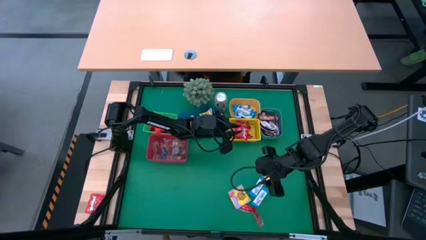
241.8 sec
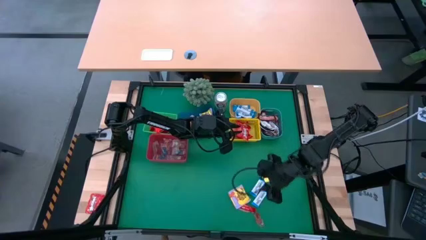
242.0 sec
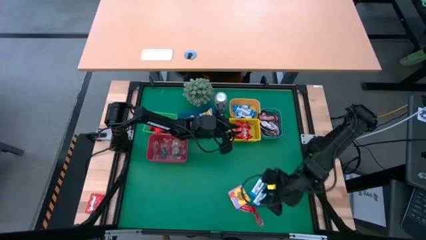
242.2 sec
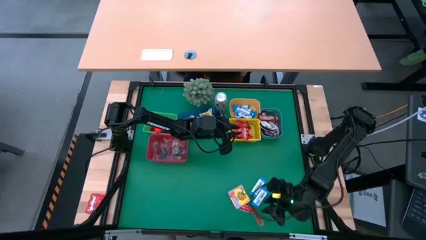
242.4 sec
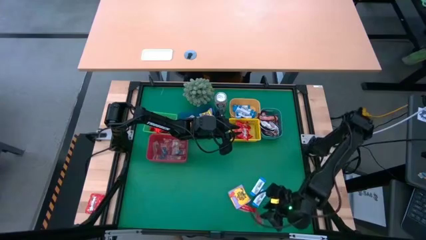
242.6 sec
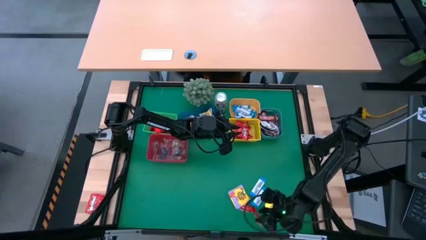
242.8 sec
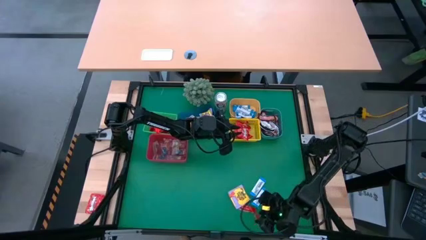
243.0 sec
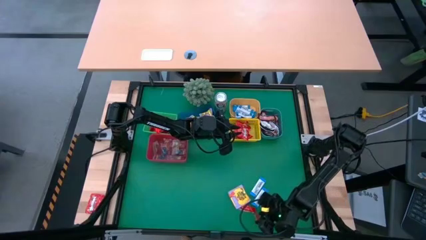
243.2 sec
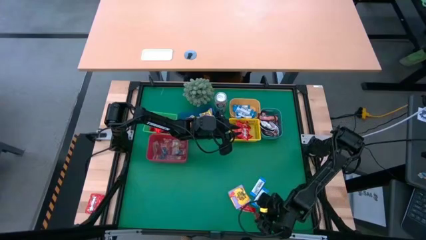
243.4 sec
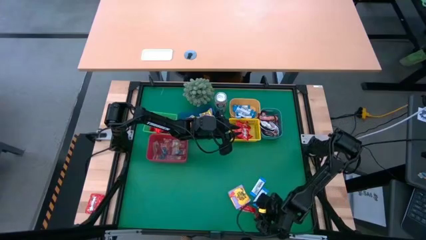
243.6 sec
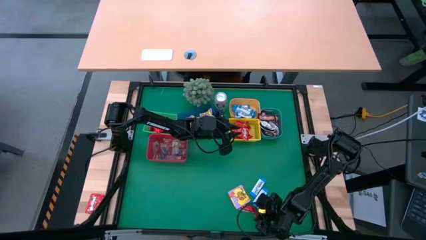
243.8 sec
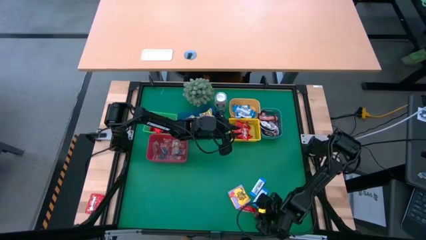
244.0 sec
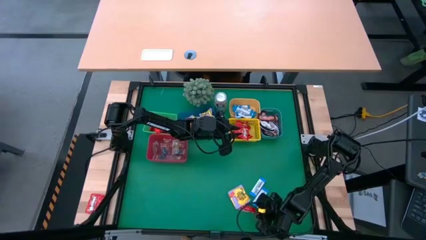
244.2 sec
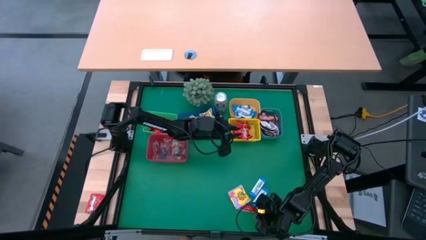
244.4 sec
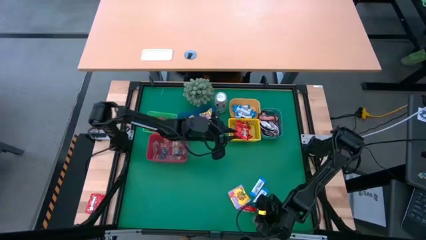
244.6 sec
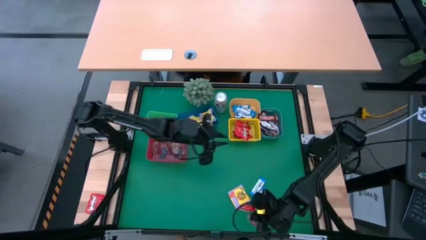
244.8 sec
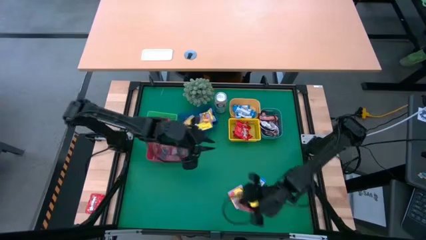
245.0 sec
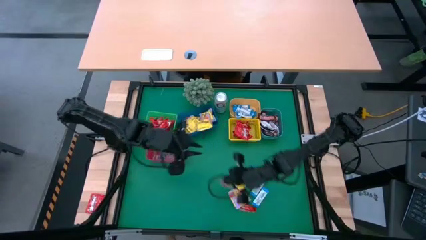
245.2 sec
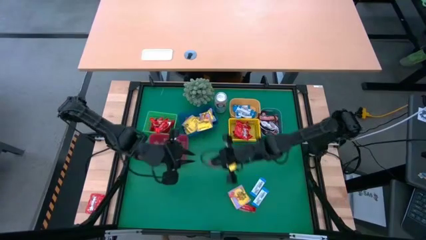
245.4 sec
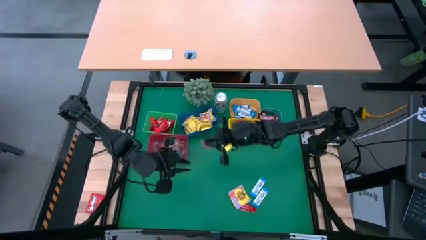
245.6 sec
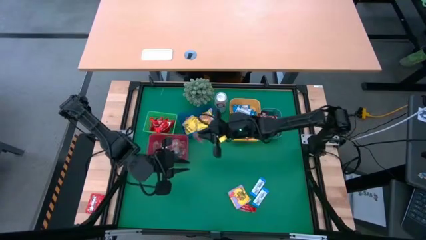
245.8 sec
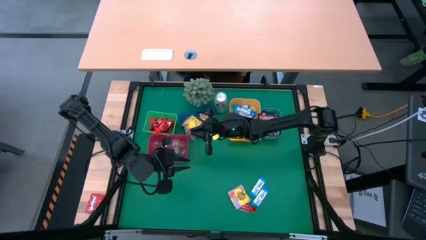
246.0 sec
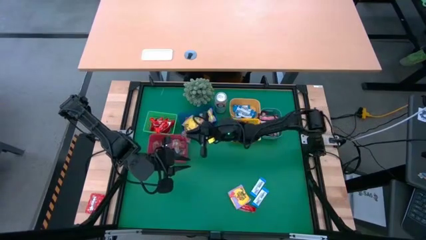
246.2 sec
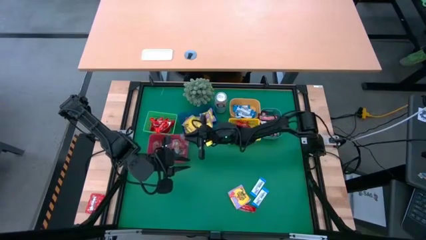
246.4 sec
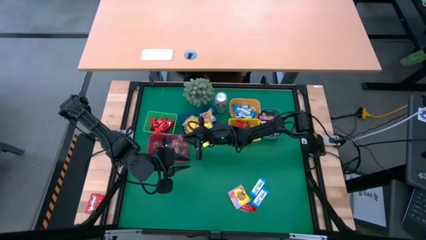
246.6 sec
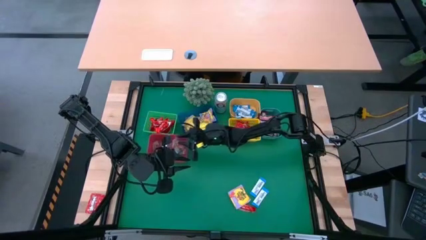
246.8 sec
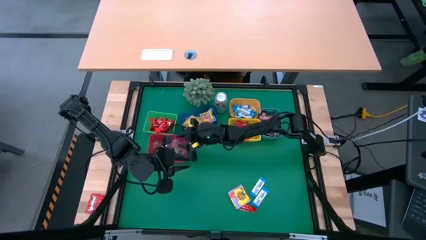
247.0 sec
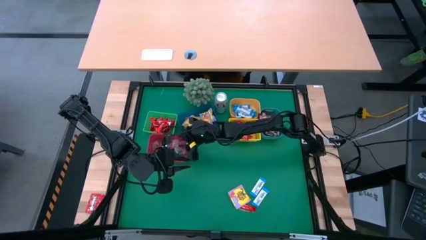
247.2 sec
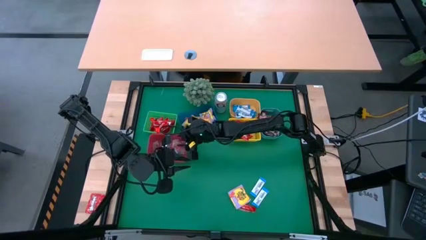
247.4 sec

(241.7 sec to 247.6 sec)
Task: Sort candy
Put the transparent orange candy into the red bin

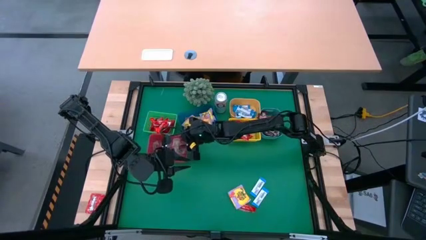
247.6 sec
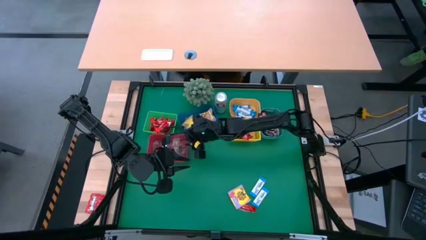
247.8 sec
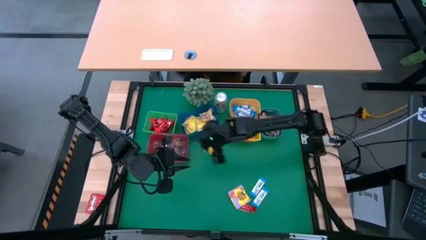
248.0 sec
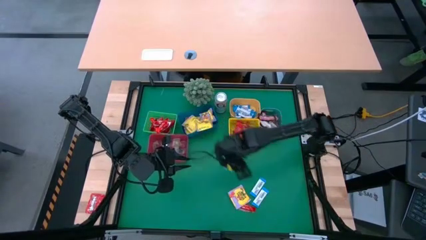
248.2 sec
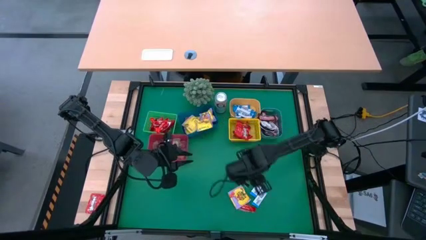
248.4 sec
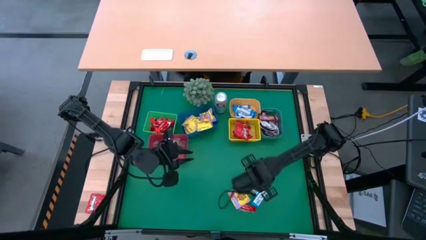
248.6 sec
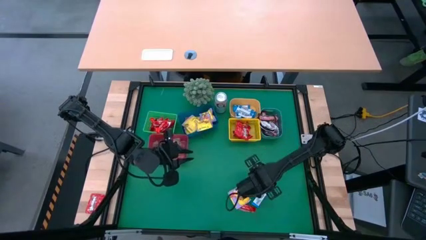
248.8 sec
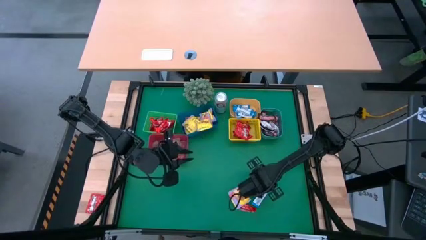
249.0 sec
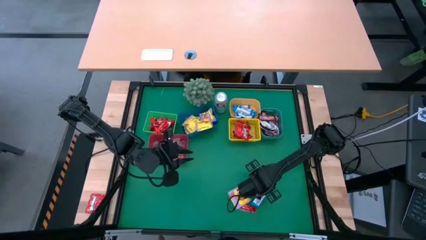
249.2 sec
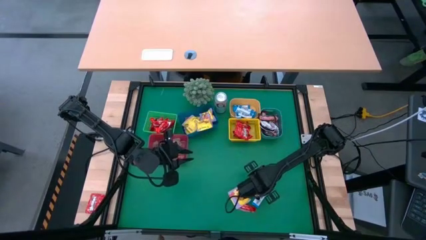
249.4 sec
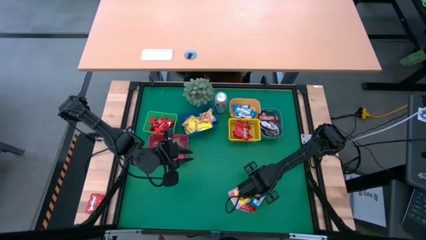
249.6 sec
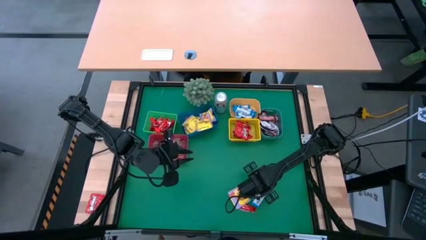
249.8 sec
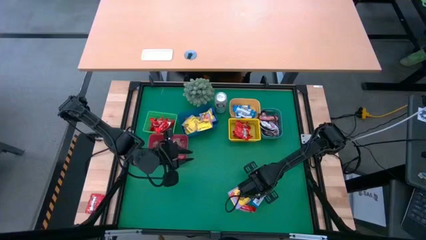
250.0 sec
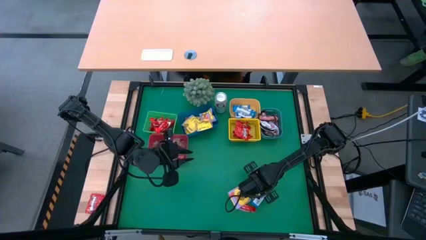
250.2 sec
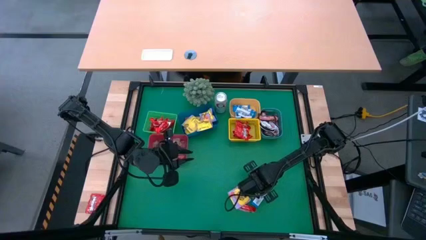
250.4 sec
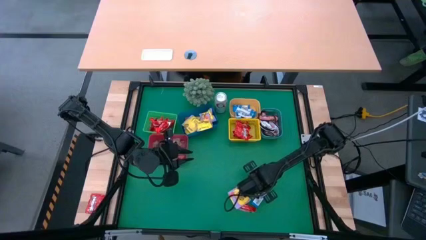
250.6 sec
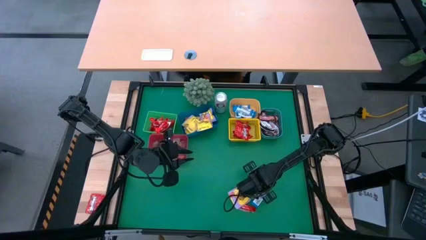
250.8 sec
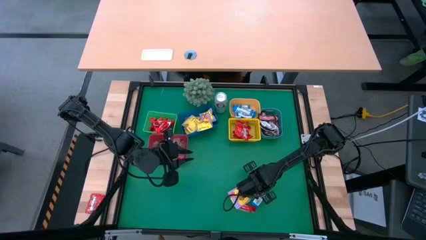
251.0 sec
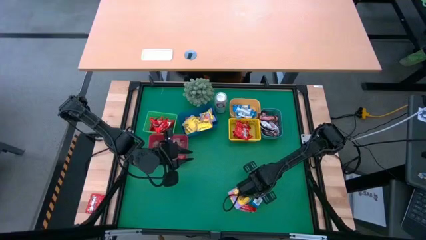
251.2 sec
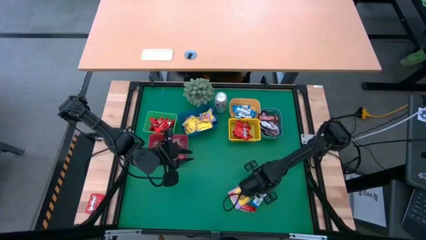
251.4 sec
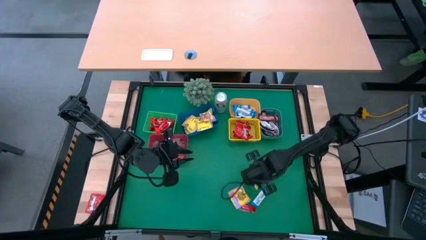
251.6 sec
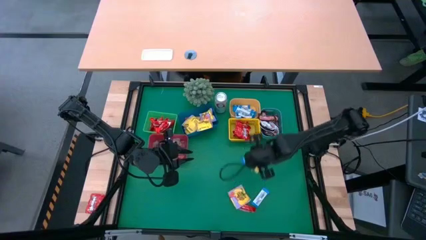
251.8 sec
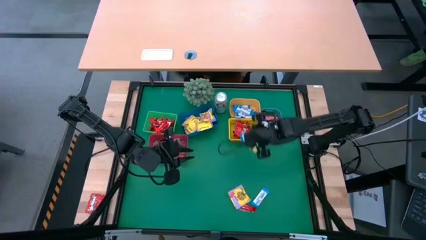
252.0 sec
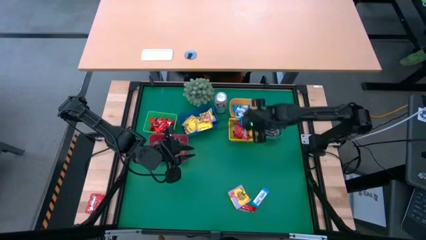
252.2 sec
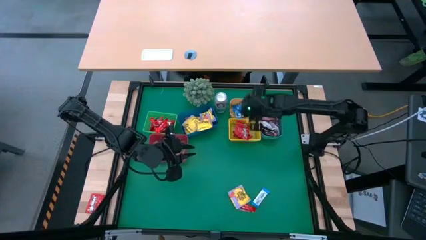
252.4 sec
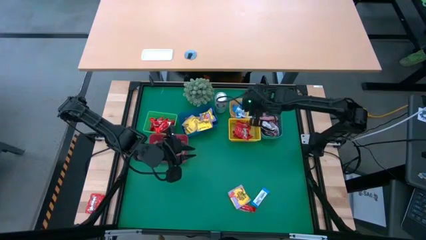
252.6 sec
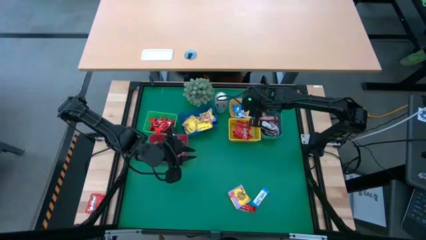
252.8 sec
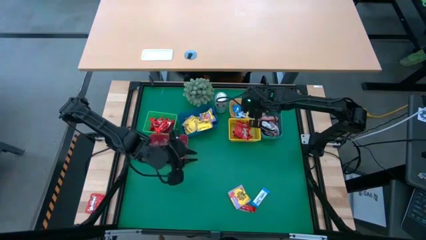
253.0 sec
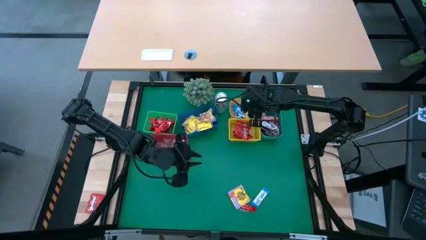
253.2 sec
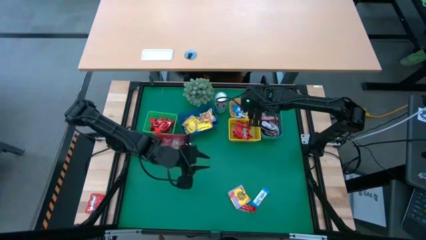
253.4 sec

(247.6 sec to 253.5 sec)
Put the blue chocolate bar into the orange bin

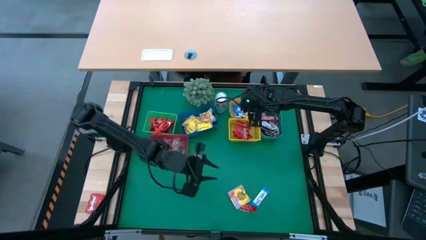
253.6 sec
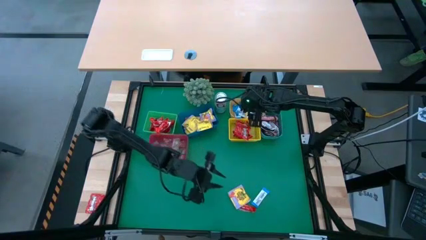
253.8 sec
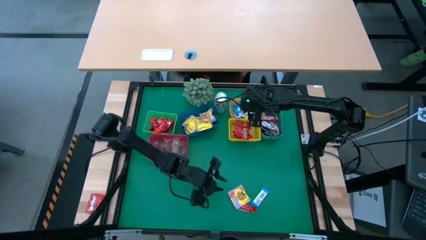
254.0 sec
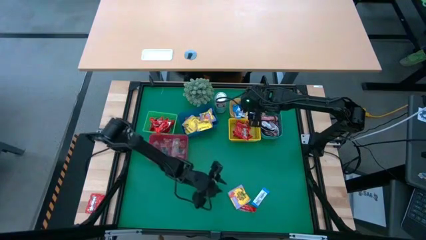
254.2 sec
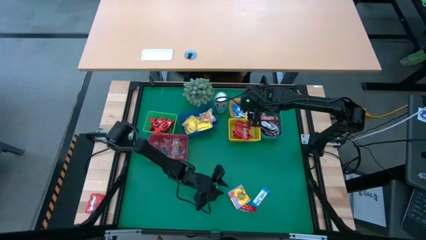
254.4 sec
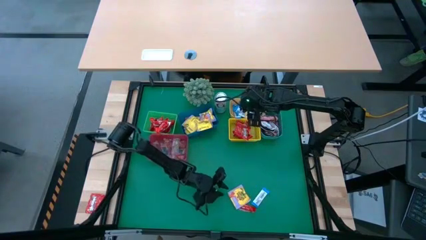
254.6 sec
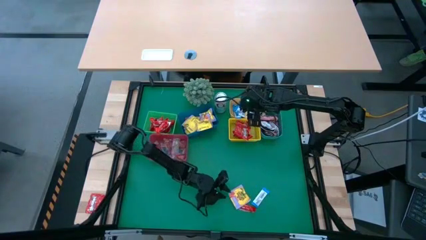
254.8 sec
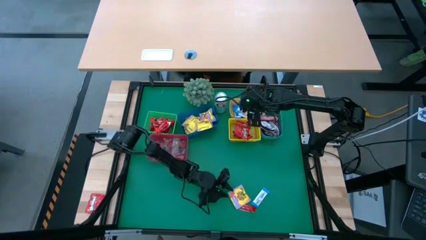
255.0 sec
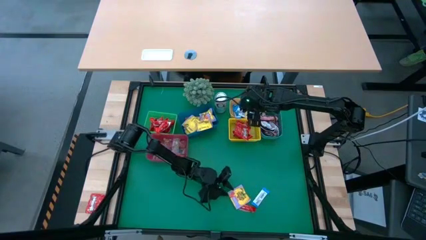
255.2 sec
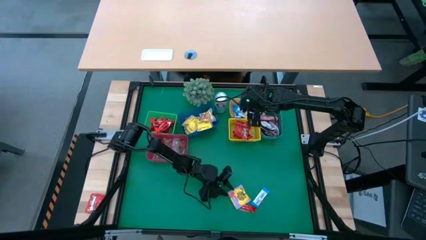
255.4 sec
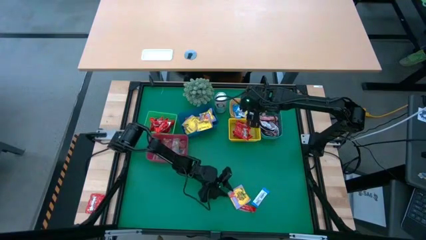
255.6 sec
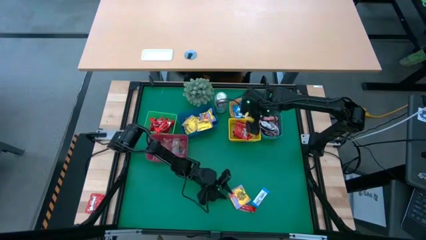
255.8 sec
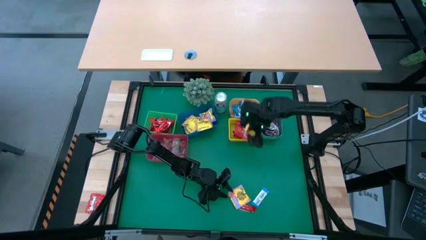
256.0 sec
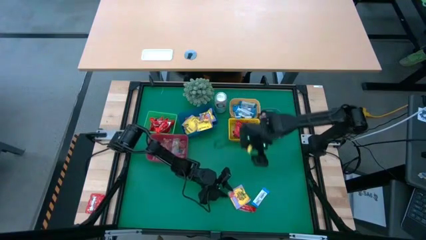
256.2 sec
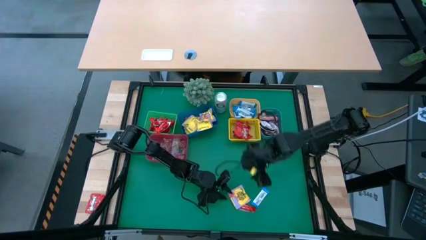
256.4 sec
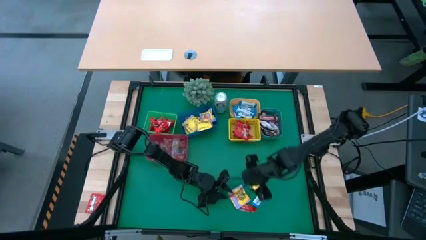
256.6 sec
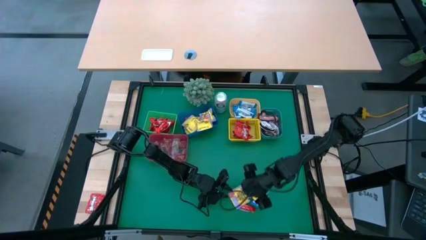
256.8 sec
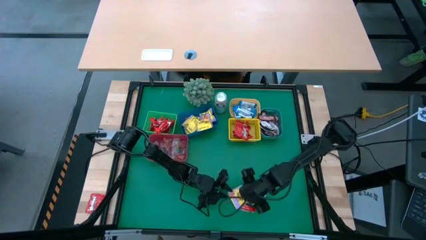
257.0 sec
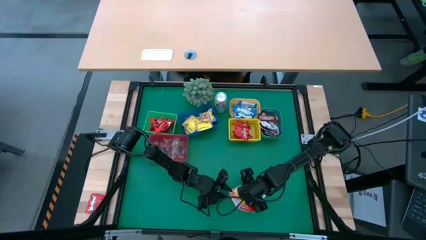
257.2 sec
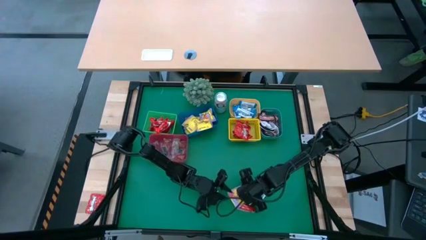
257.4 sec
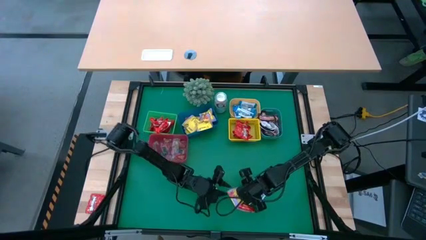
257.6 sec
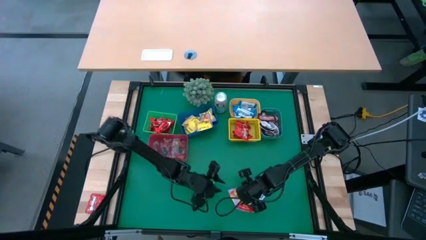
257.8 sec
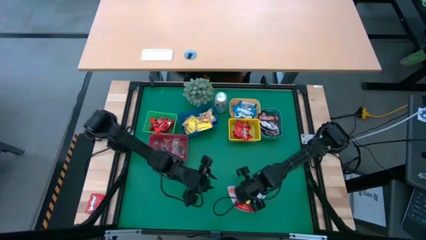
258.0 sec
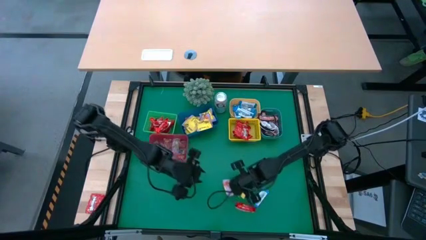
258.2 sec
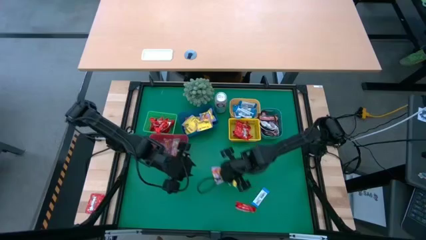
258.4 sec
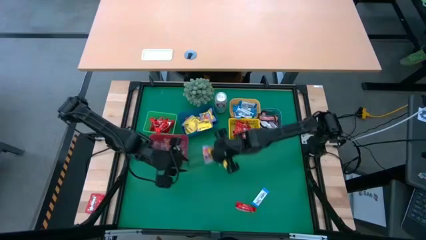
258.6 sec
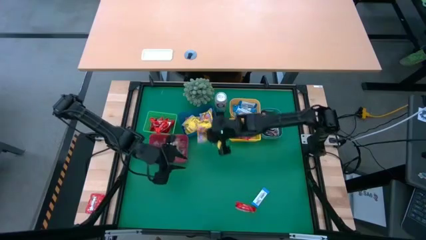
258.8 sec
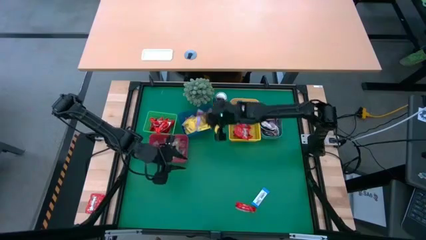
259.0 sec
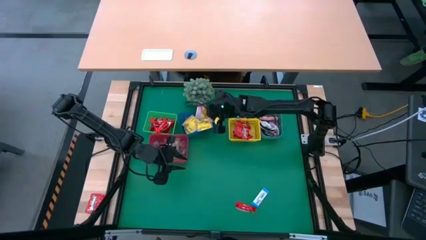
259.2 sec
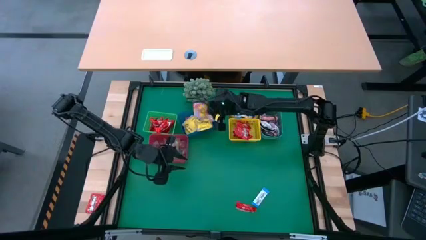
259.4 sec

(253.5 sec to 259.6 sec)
Put the yellow candy pack into the blue bin
